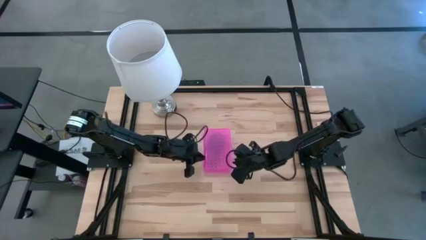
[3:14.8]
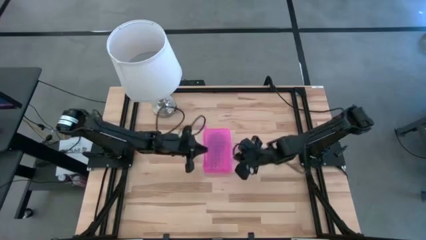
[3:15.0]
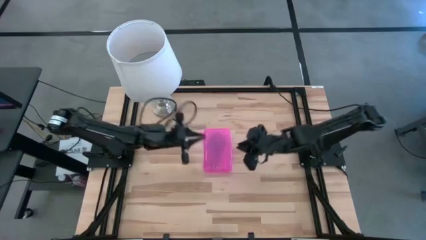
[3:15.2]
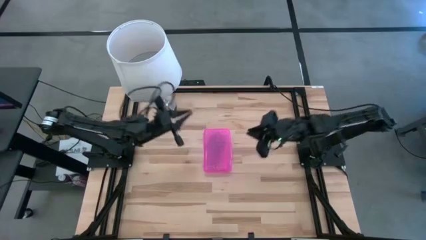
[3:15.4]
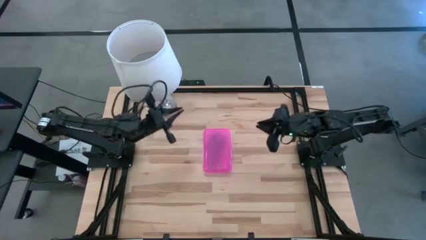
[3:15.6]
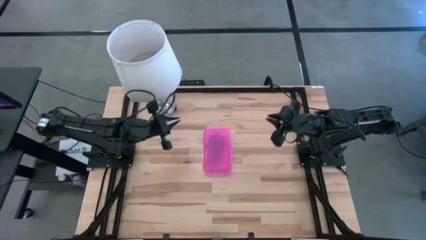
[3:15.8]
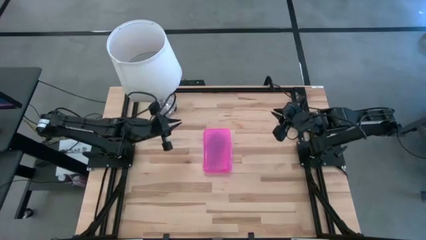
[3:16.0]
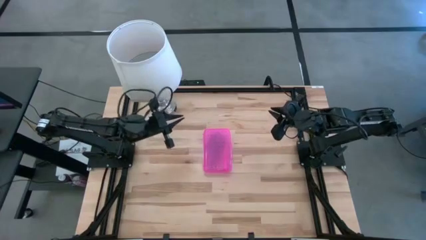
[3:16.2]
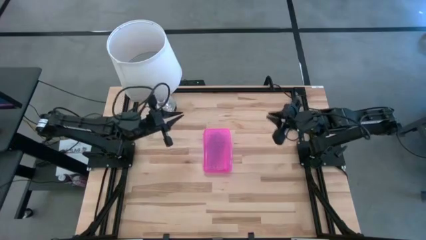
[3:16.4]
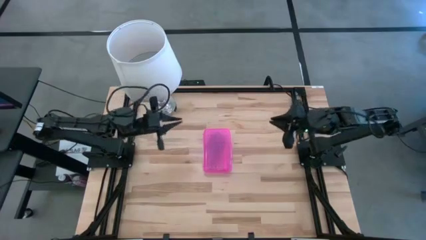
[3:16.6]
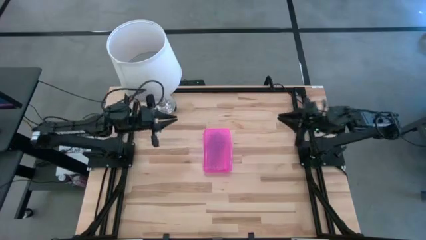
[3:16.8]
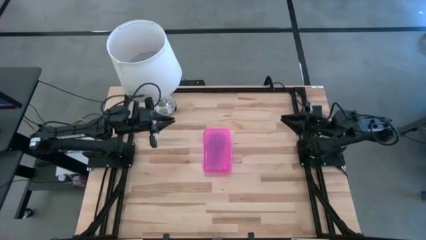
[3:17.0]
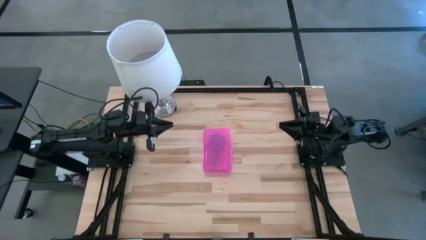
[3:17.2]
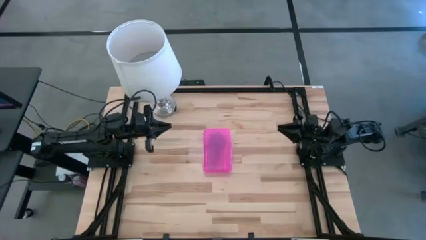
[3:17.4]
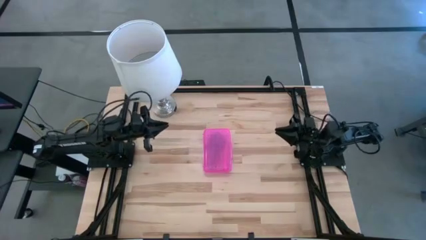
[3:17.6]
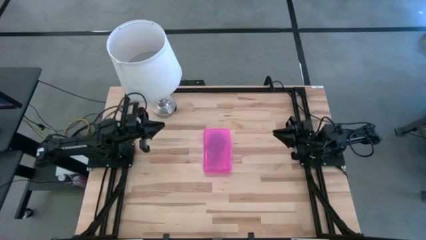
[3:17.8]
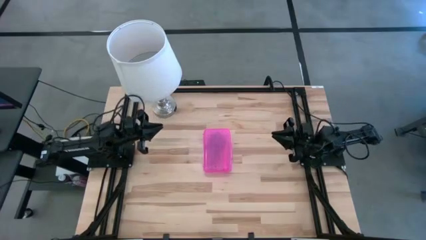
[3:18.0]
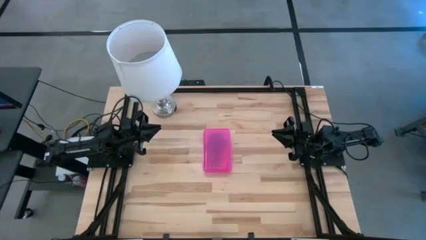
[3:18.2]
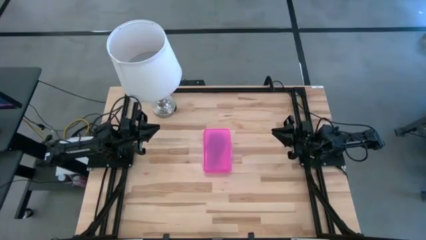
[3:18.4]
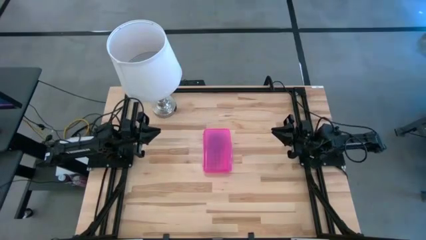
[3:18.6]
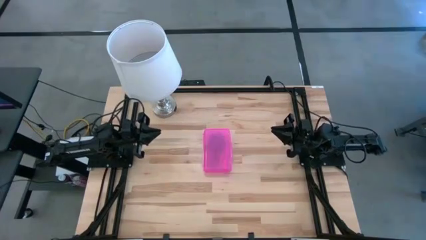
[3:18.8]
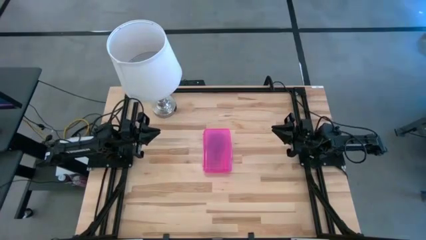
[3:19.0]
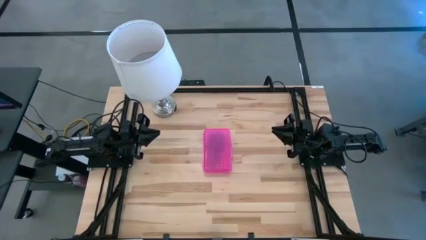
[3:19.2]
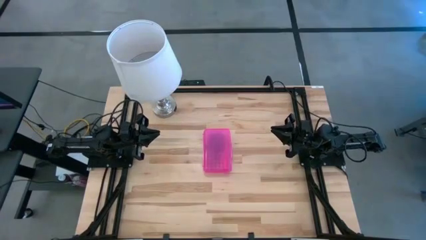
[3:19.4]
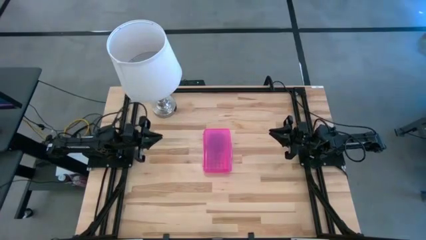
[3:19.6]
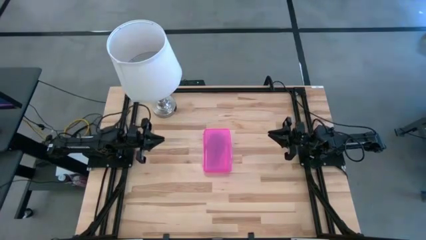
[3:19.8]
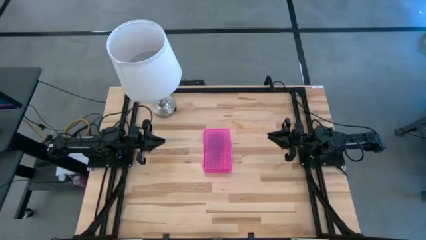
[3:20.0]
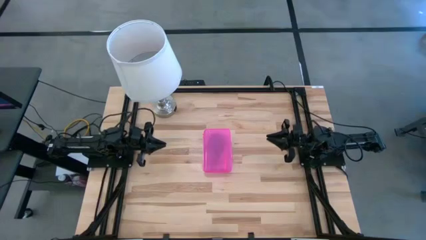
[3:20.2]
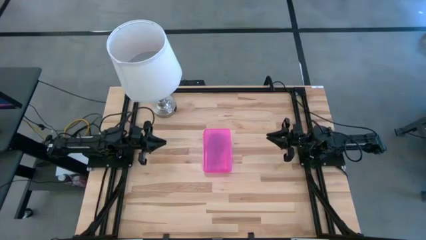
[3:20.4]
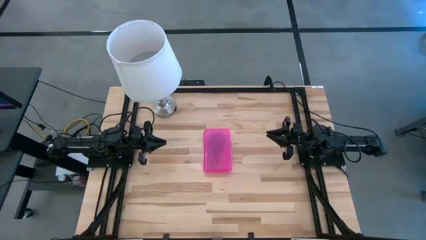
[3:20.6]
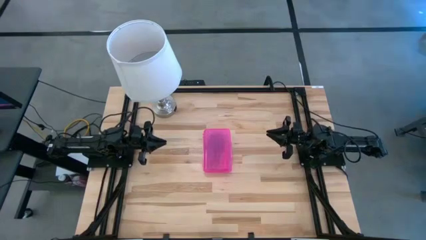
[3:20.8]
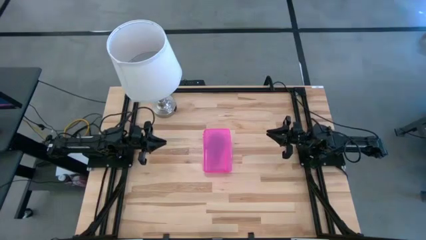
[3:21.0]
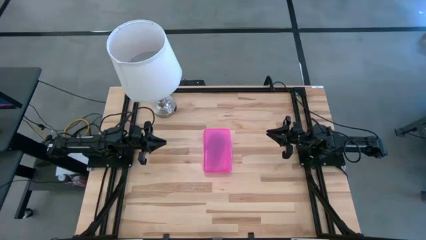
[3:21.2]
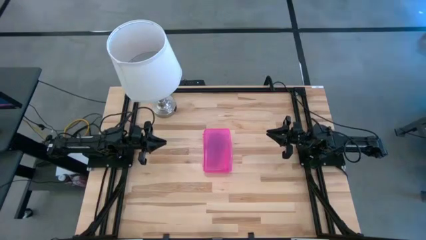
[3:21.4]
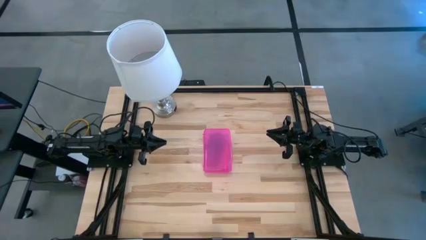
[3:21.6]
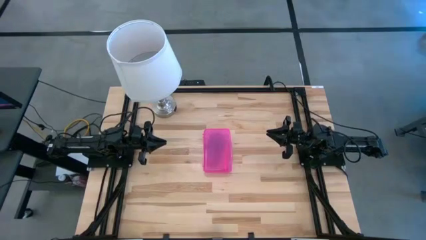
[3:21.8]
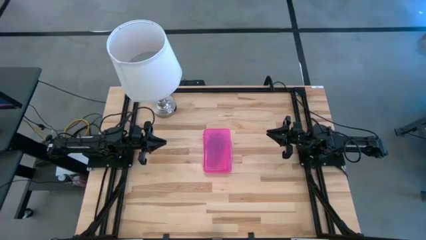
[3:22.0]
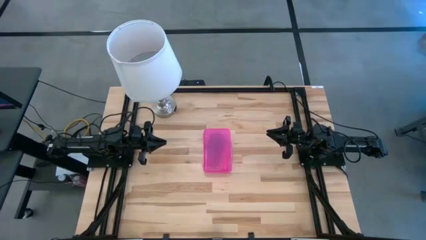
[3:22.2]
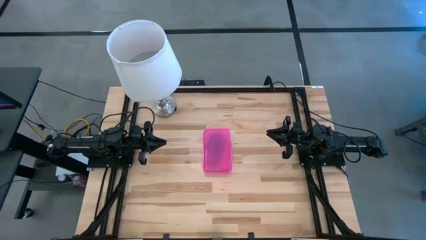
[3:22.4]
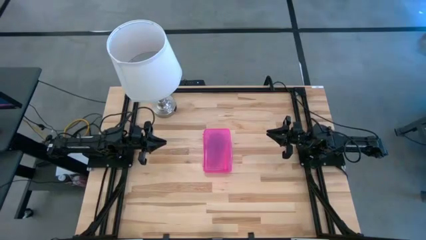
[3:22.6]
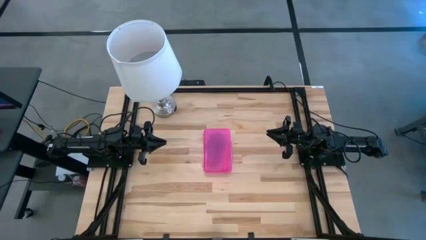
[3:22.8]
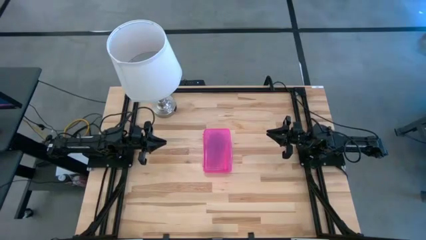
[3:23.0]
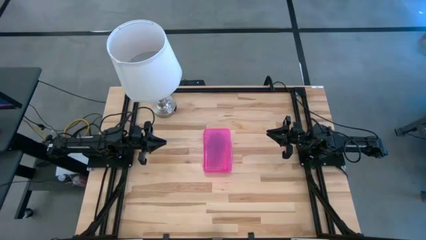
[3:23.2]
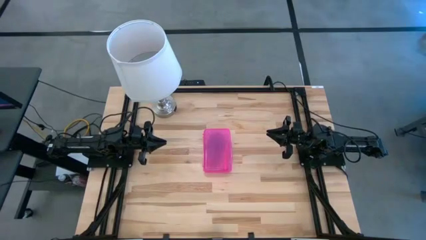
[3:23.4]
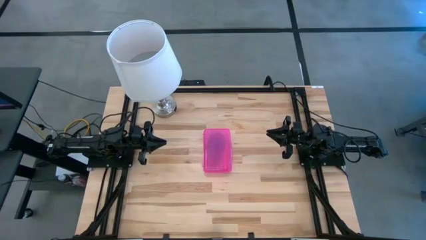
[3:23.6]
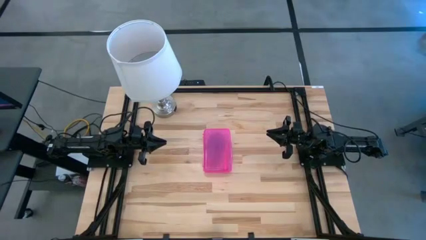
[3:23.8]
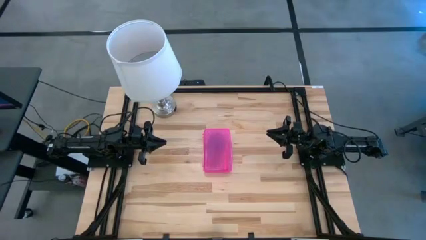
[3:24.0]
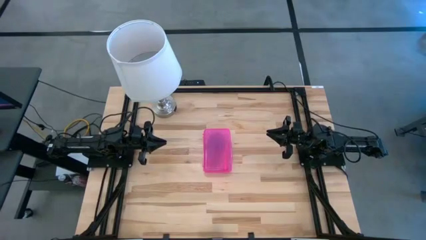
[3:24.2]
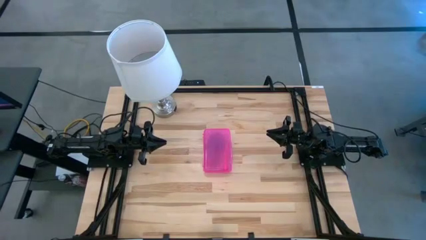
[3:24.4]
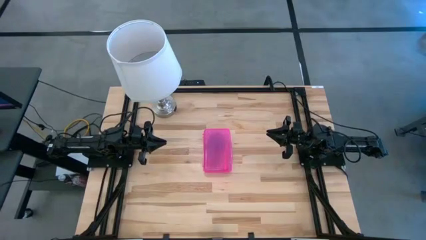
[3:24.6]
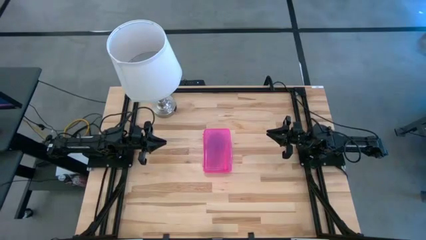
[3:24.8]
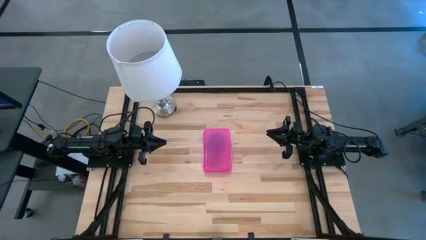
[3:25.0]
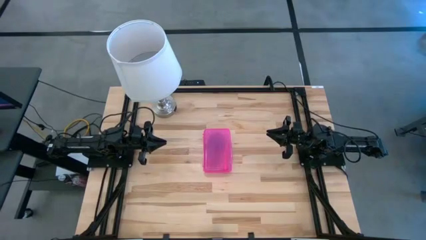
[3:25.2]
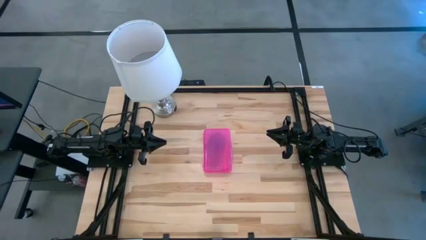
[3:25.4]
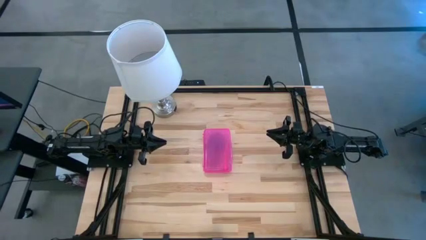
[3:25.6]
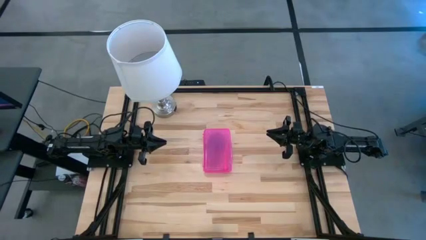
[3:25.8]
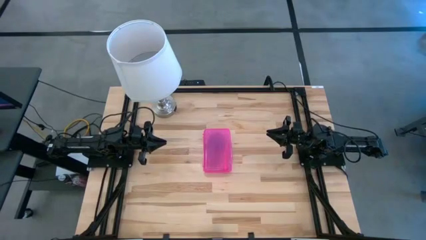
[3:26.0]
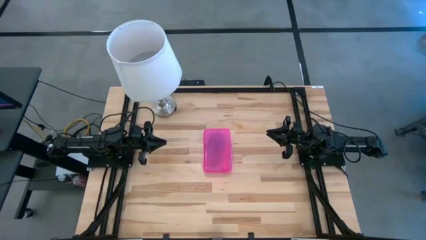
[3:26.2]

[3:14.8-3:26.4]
Task: Pick & place school supplies into a supply box
Return to Home Position

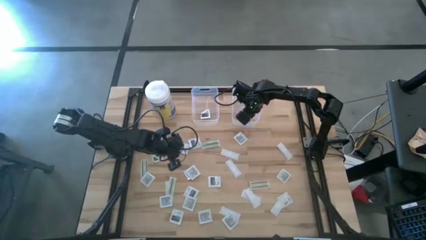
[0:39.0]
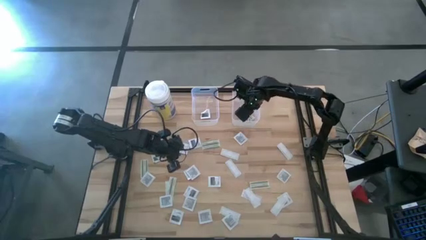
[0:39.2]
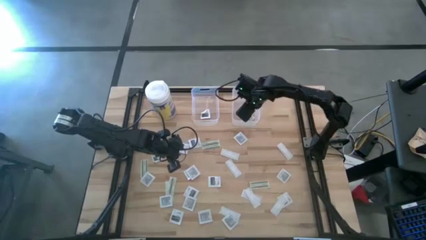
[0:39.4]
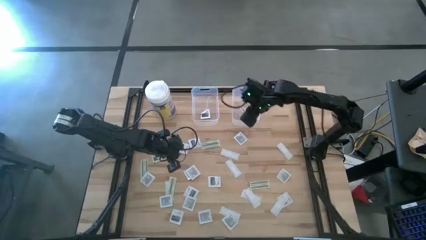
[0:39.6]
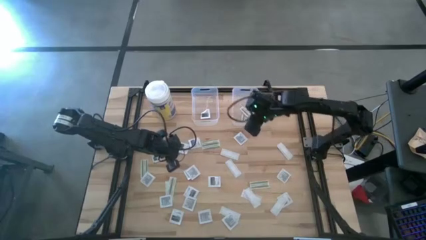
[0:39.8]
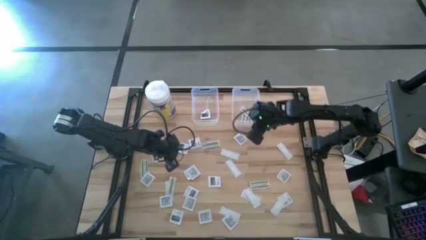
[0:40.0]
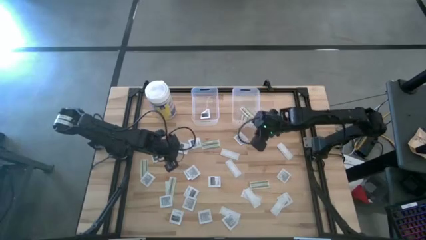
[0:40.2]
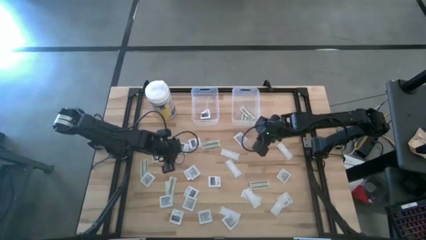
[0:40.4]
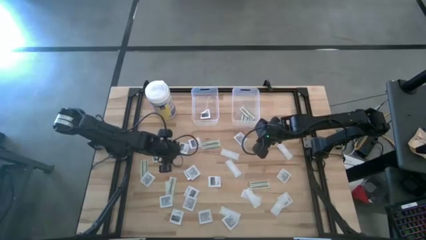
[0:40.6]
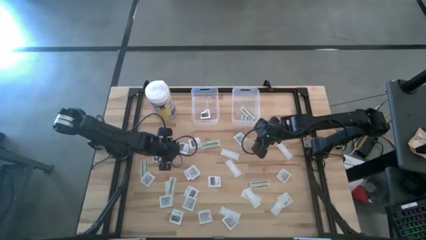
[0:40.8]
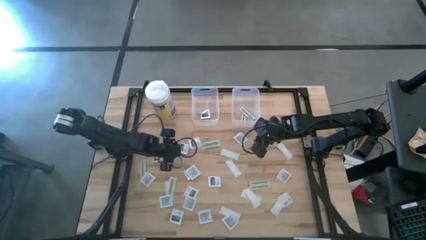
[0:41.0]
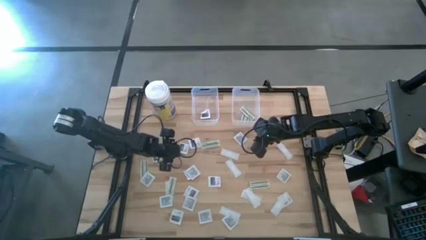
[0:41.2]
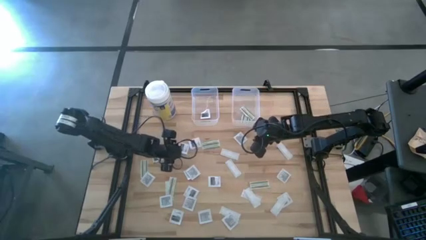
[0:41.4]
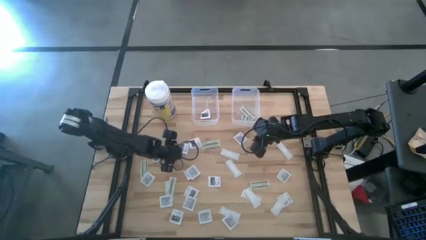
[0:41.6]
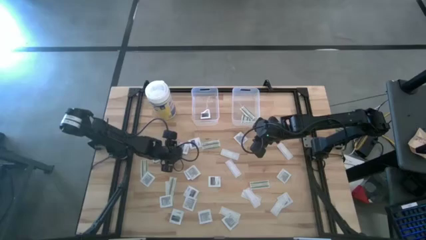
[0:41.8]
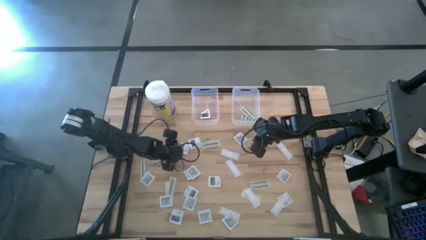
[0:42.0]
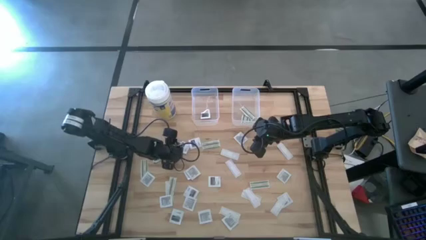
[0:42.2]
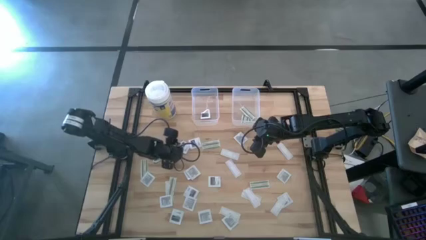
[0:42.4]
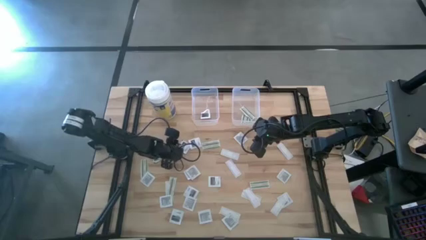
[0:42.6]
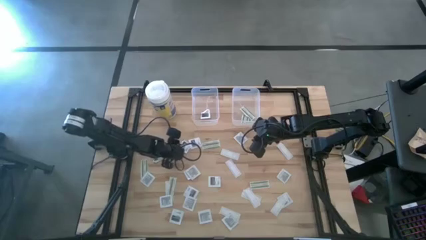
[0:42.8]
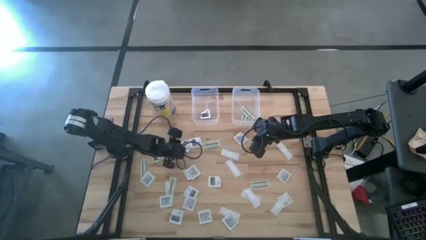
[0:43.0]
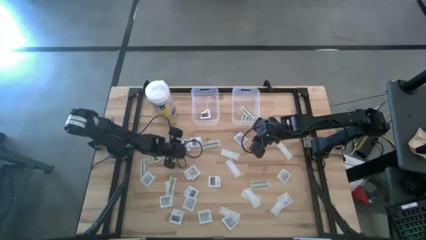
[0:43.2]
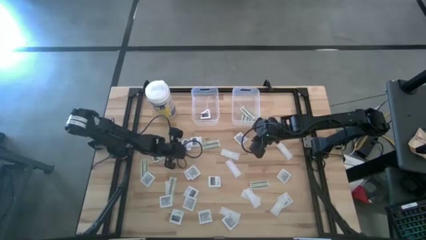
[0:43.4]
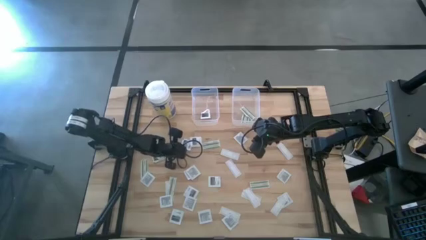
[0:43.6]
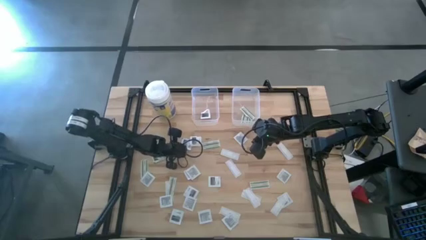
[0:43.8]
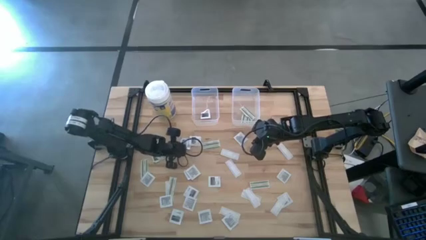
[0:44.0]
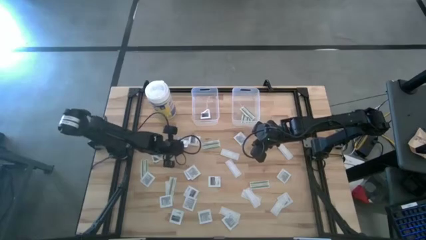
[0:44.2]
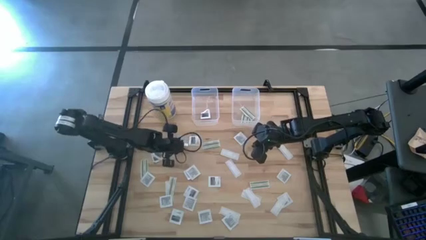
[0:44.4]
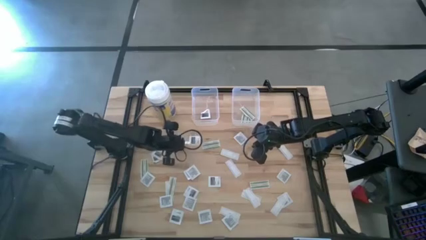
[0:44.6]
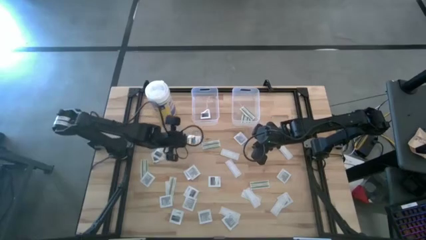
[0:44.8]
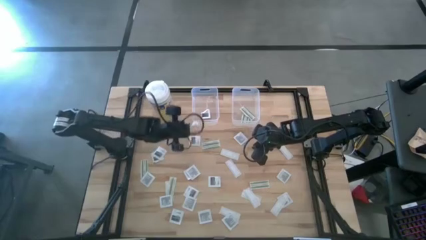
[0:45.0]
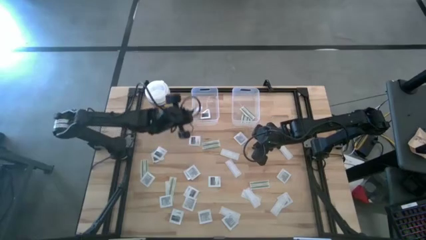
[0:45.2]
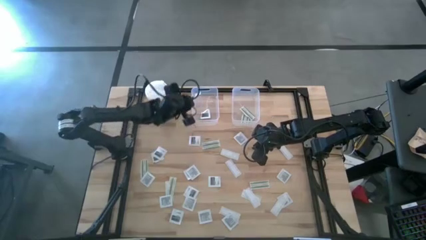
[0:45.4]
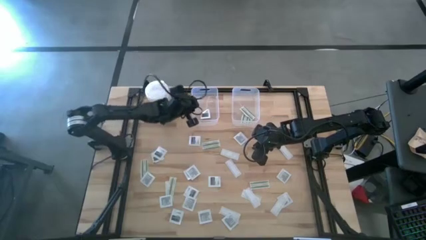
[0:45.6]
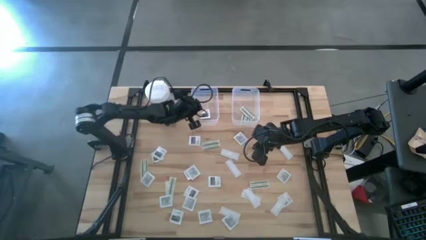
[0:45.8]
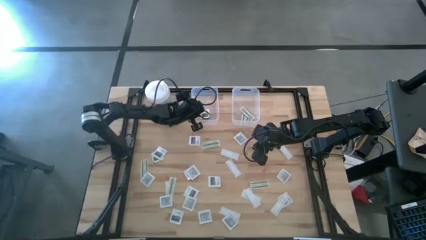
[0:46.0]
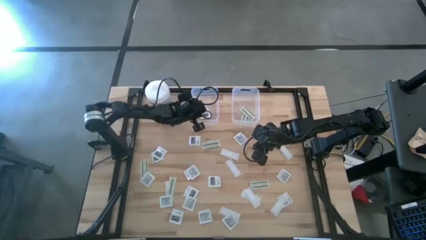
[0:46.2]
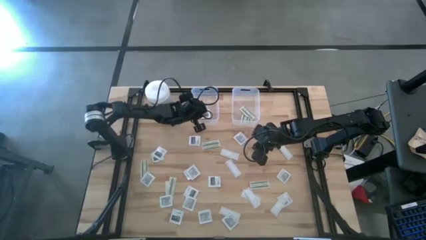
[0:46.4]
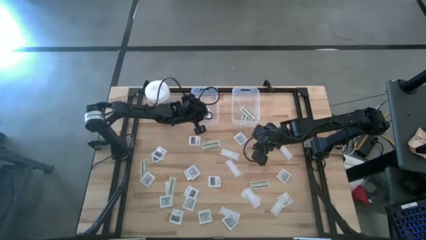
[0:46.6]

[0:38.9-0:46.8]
Task: Pick & Place First Aid Supplies
Put the towelette pack into the left transparent bin
